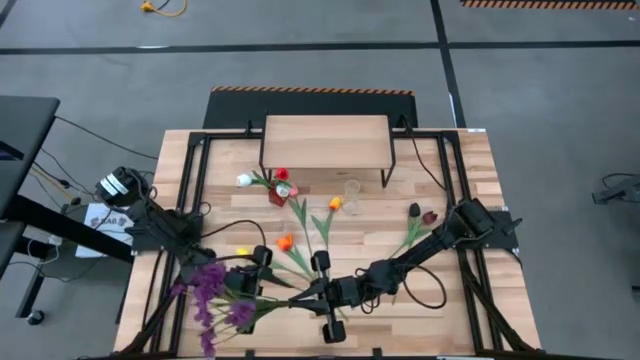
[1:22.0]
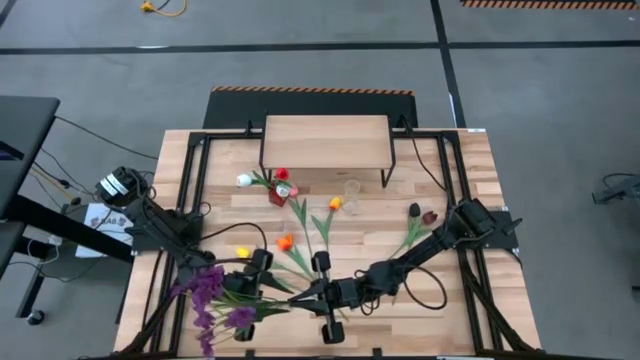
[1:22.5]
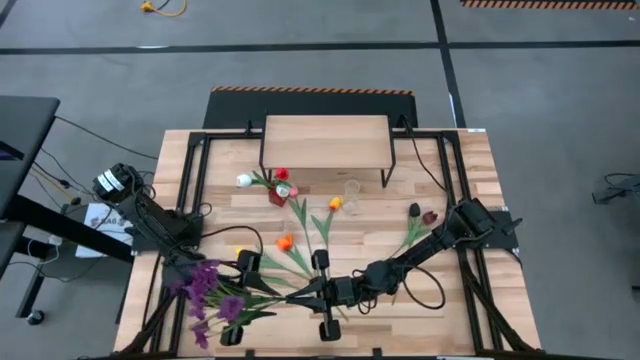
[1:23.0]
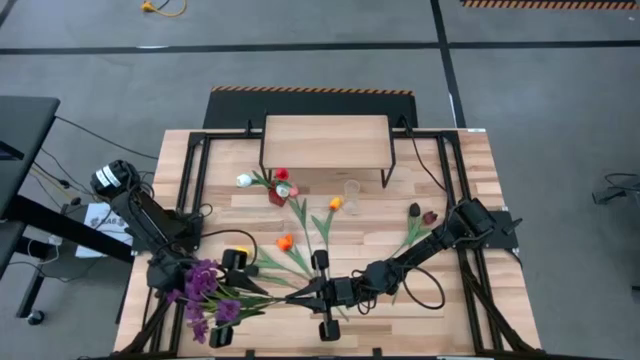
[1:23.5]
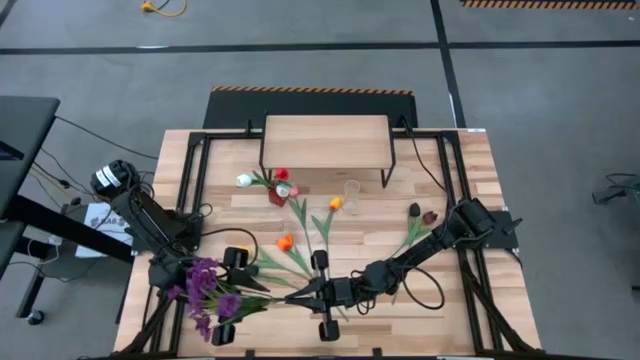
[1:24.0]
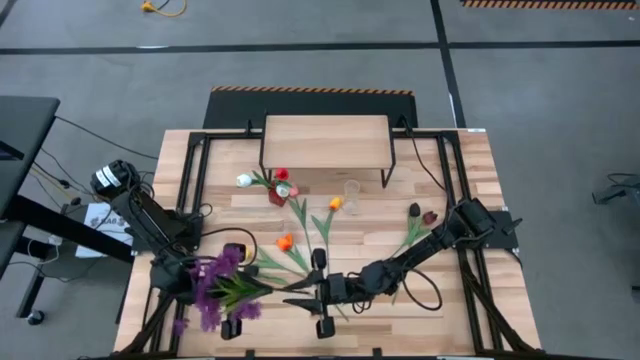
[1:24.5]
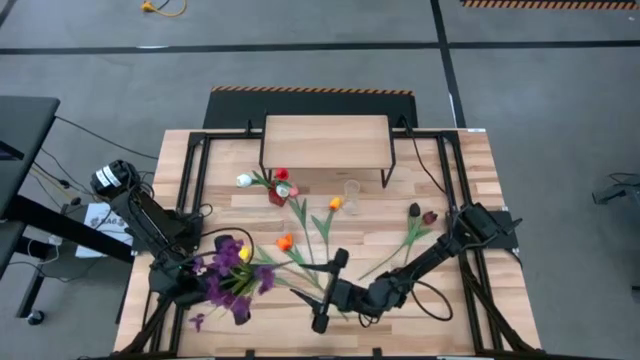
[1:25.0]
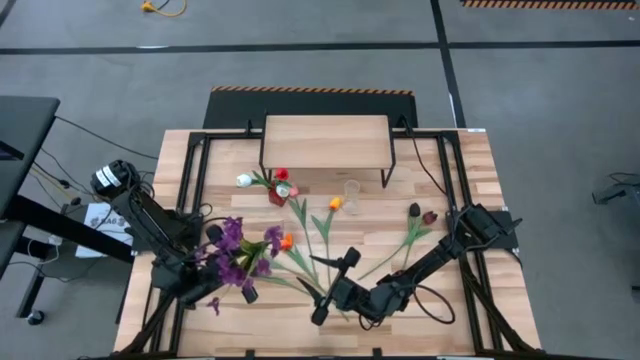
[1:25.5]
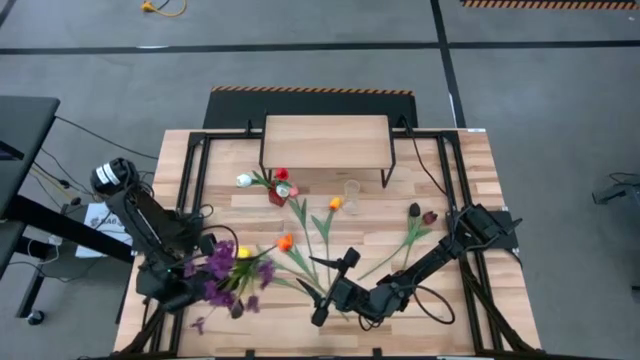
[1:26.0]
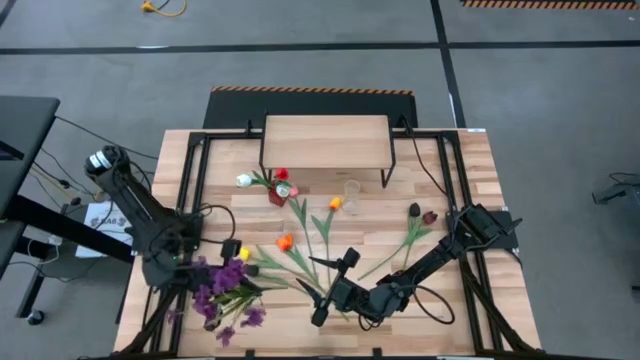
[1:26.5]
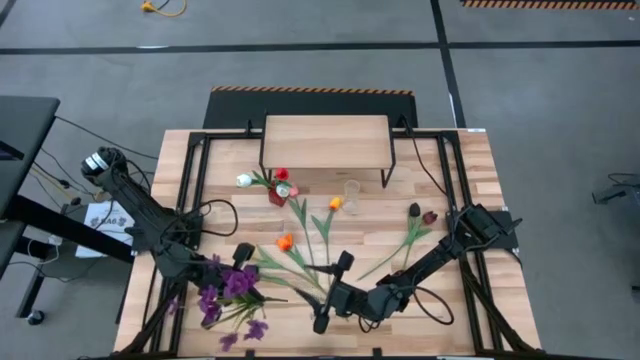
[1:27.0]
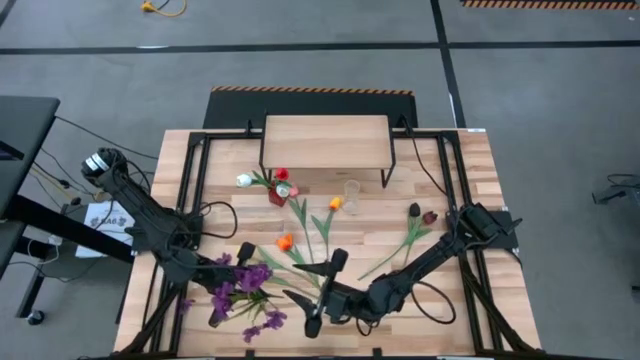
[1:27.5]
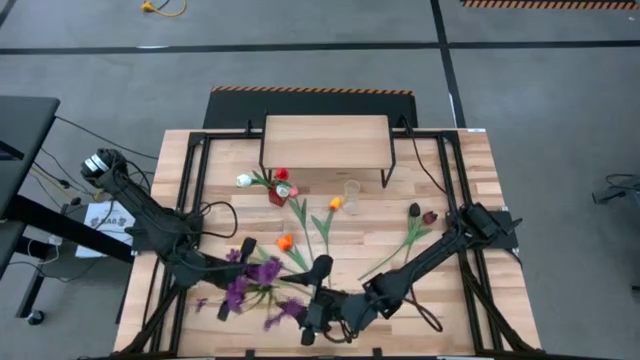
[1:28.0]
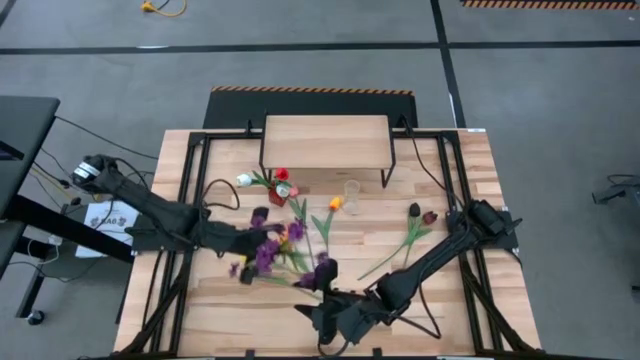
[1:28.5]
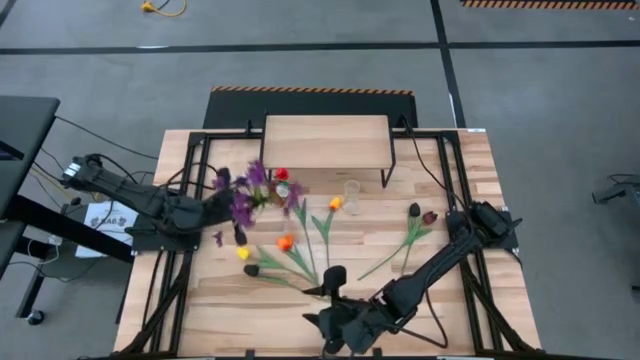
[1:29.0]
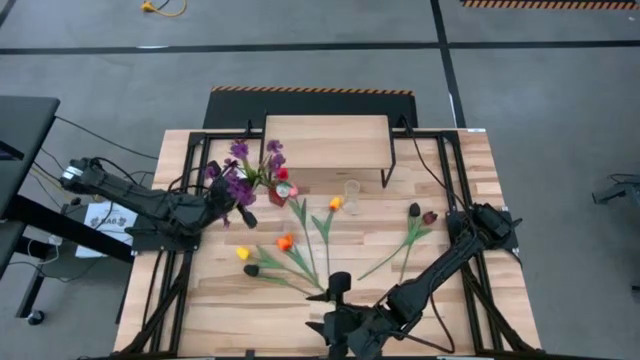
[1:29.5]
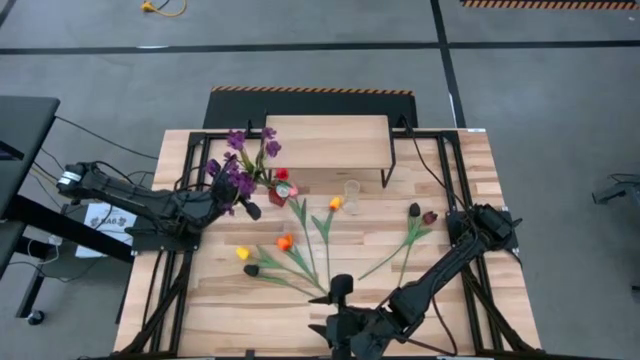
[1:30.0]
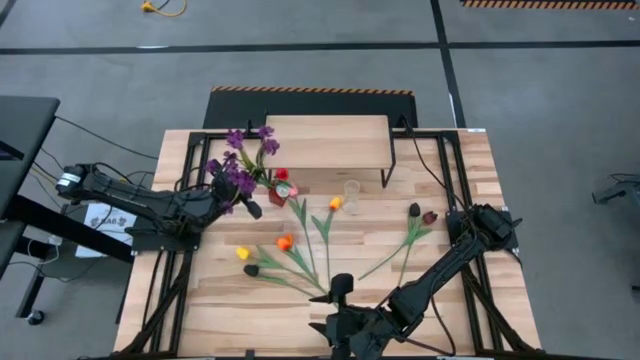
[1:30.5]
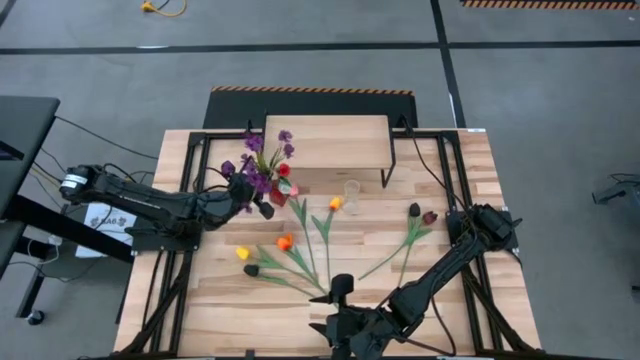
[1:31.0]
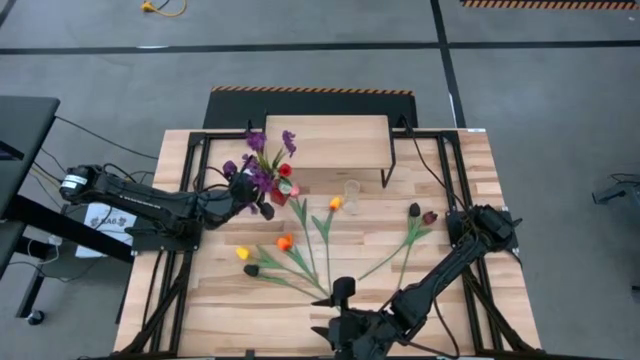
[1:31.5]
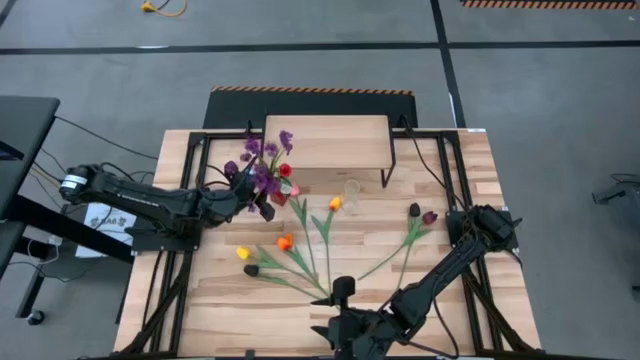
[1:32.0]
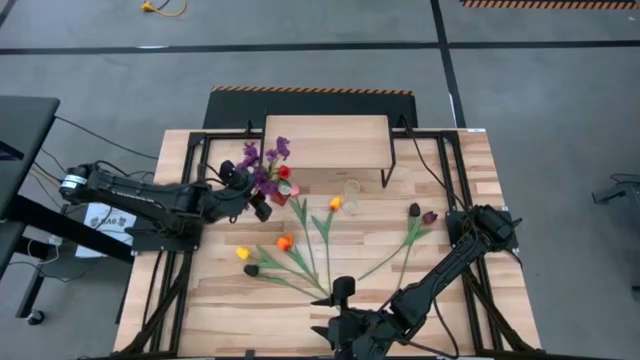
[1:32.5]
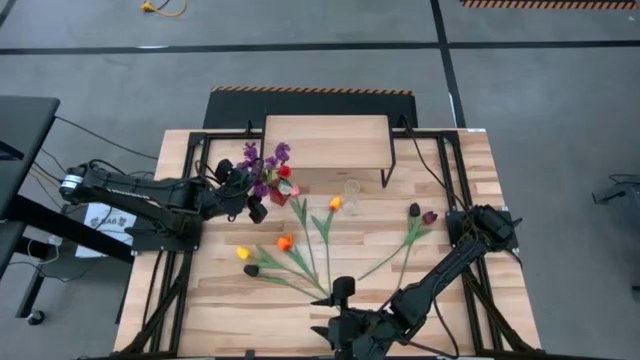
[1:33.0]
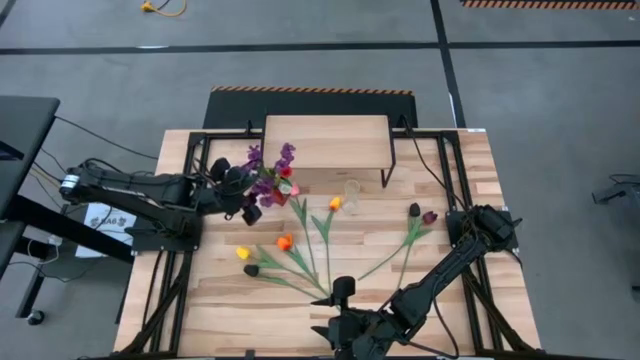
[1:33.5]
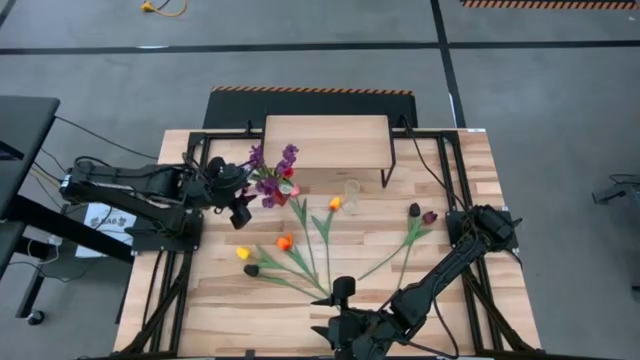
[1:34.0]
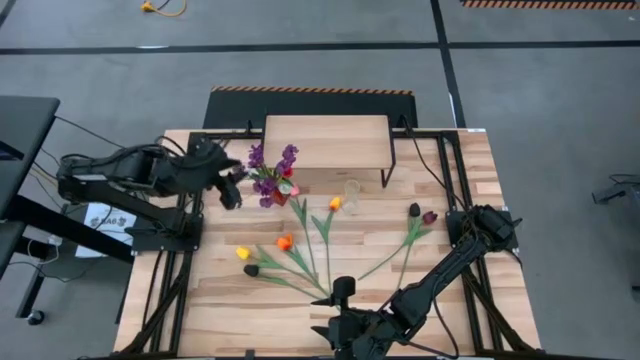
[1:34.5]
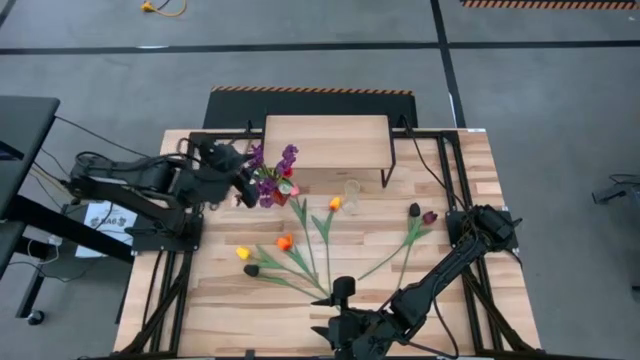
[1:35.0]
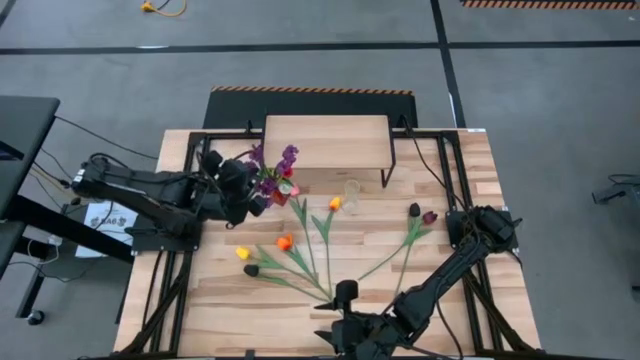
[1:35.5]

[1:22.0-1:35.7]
Task: Pick and place flowers into a vace then onto a shelf
Put the purple flowers into the red flower vase

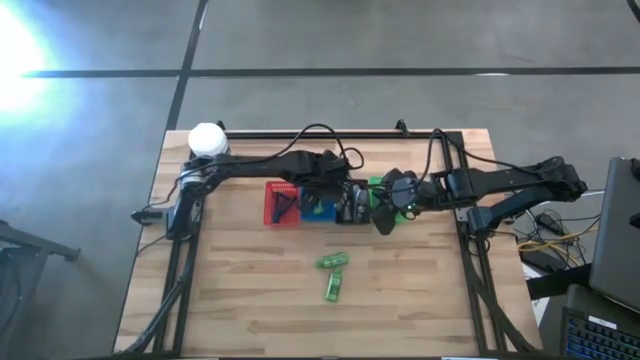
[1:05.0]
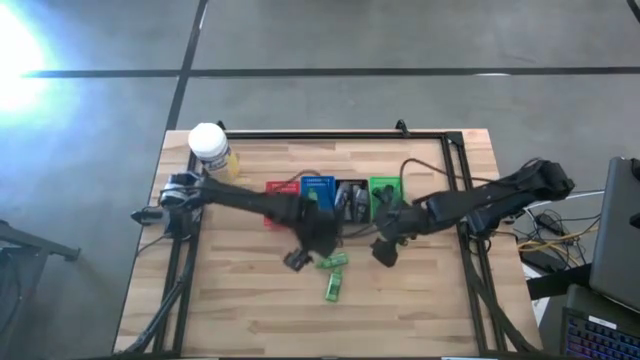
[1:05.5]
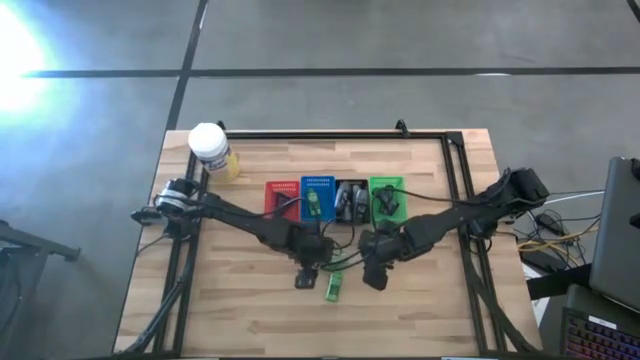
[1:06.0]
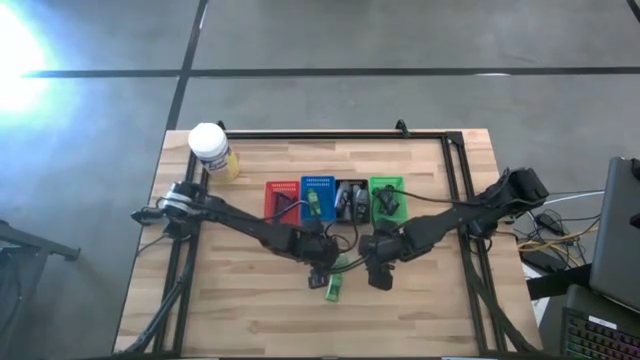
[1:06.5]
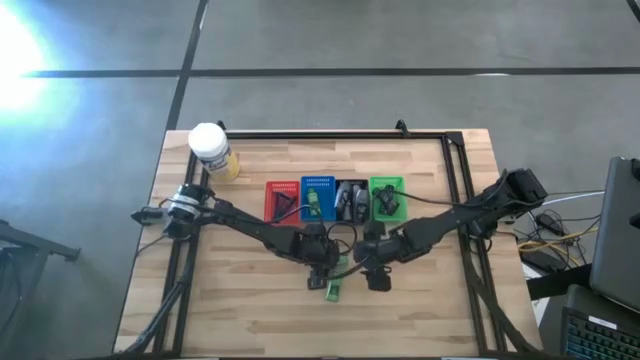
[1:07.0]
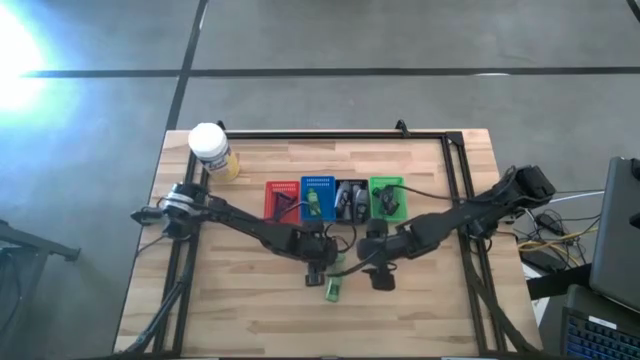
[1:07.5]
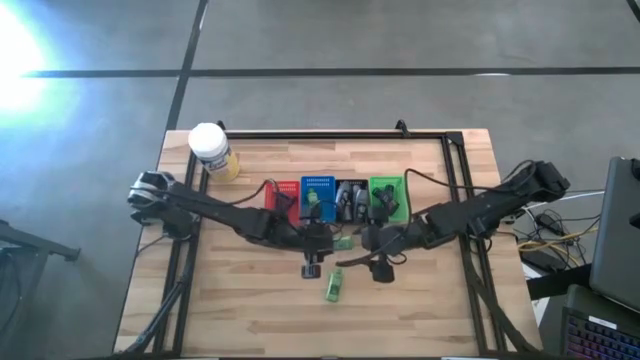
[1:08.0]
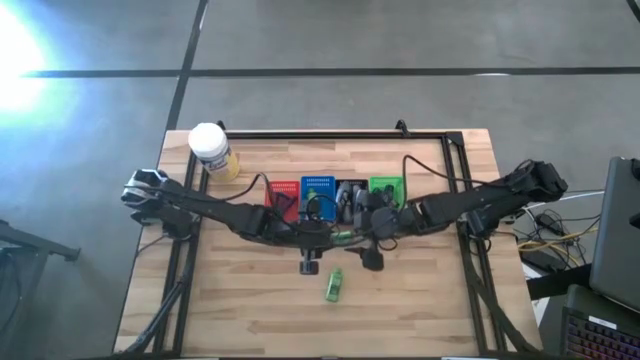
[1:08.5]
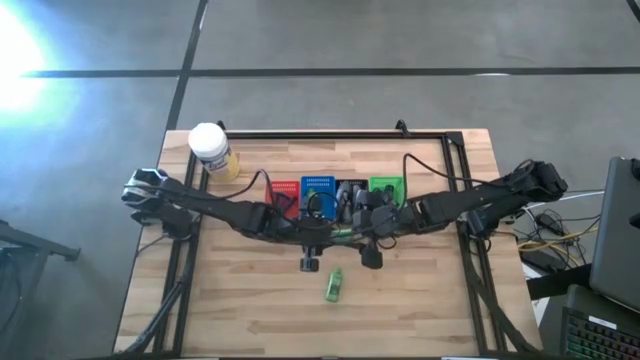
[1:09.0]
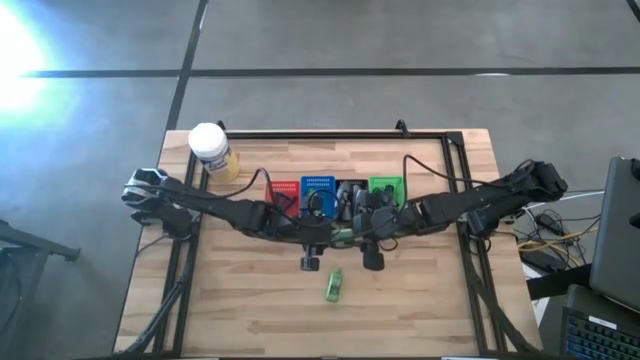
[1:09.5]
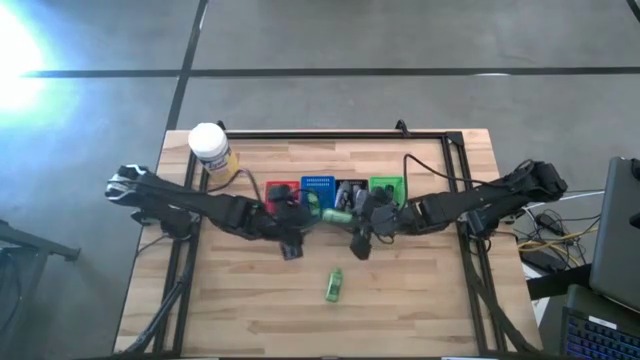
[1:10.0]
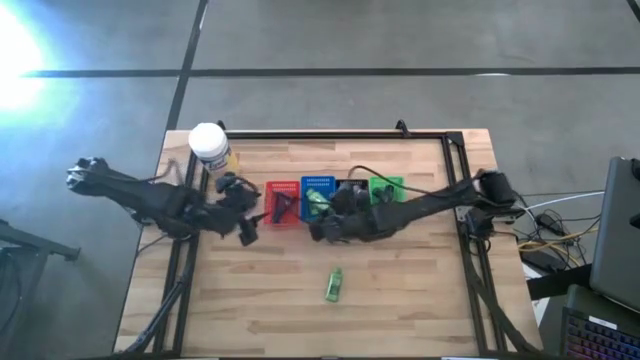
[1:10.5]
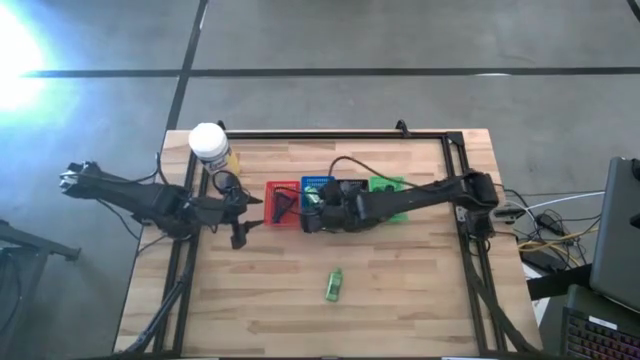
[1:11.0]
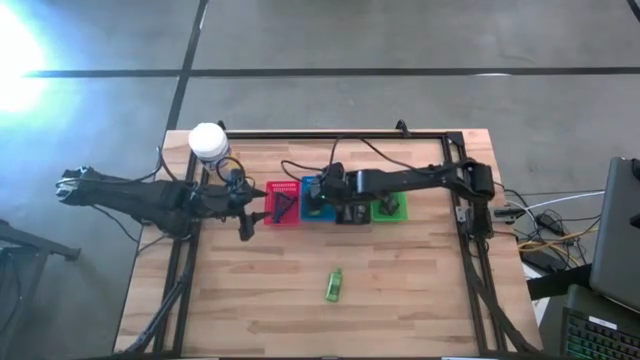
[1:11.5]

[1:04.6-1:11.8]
Task: Pick & Place Travel size toiletries
Put the green shampoo into the blue bin
